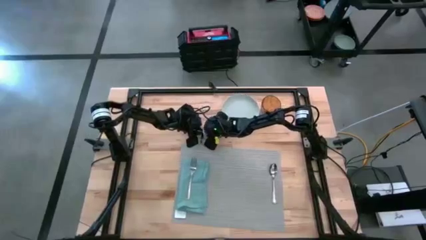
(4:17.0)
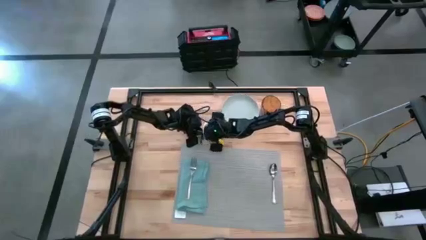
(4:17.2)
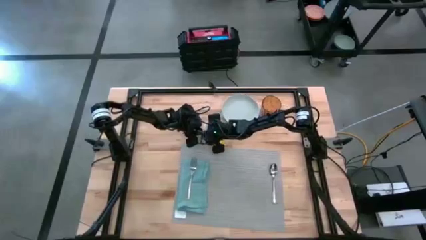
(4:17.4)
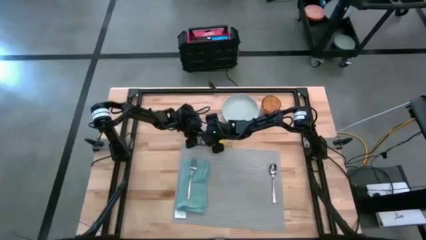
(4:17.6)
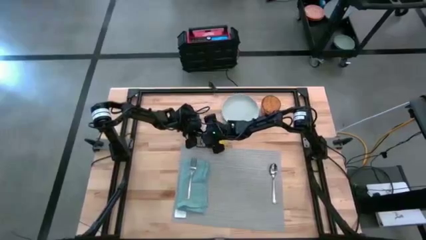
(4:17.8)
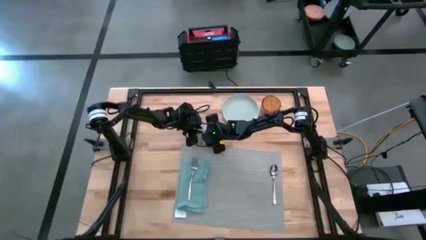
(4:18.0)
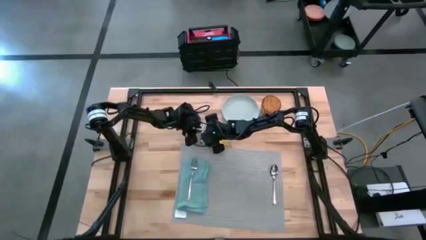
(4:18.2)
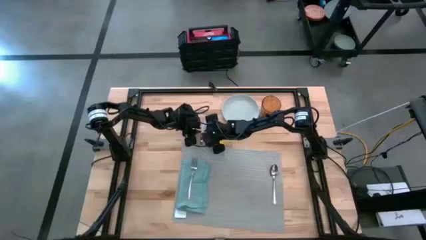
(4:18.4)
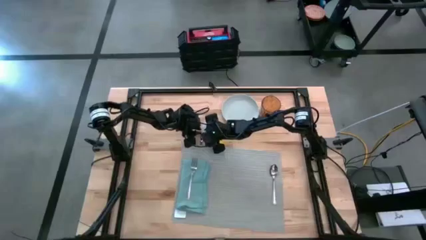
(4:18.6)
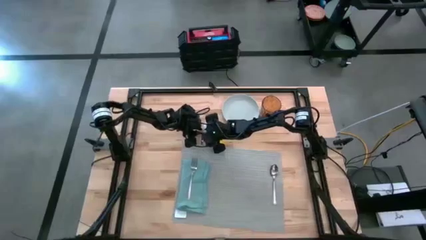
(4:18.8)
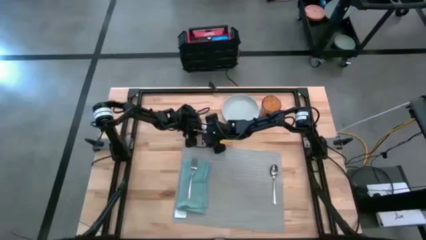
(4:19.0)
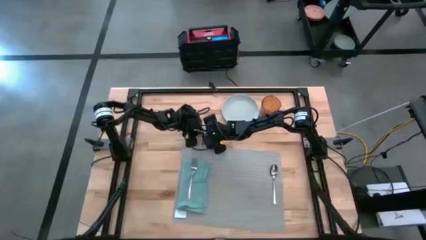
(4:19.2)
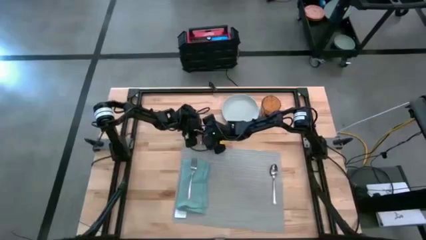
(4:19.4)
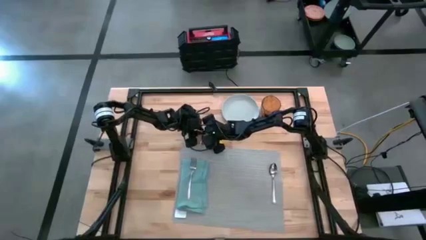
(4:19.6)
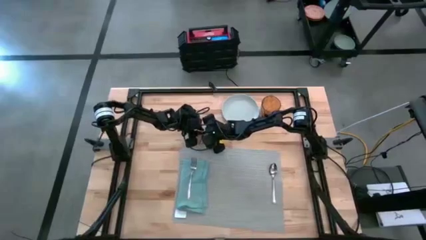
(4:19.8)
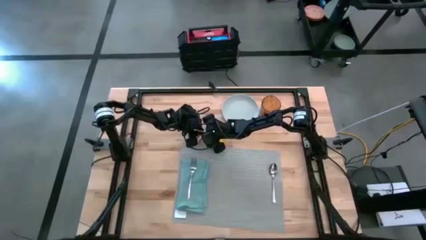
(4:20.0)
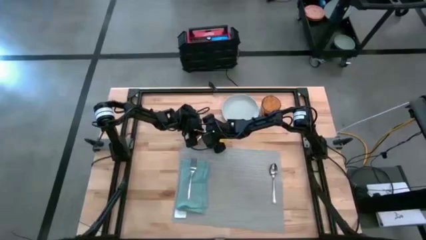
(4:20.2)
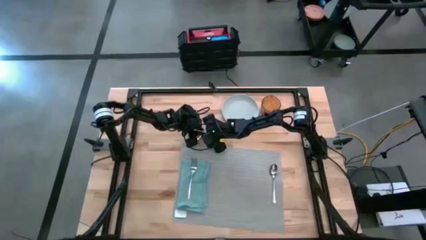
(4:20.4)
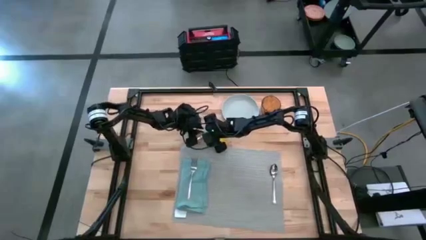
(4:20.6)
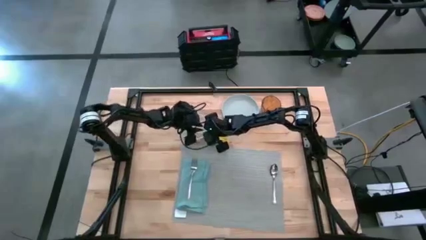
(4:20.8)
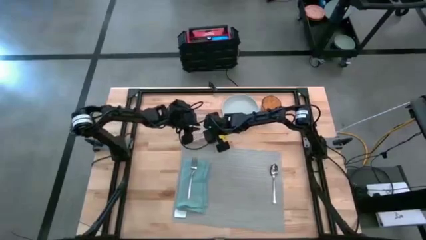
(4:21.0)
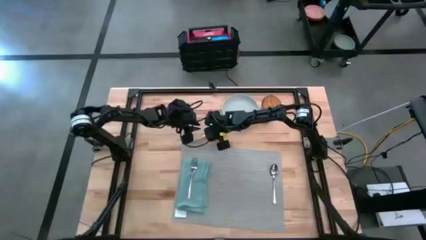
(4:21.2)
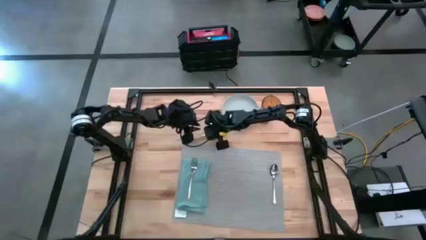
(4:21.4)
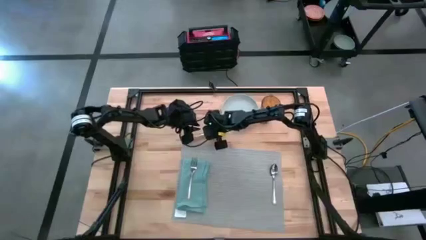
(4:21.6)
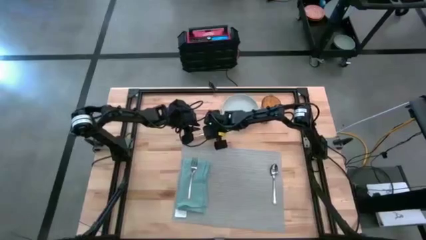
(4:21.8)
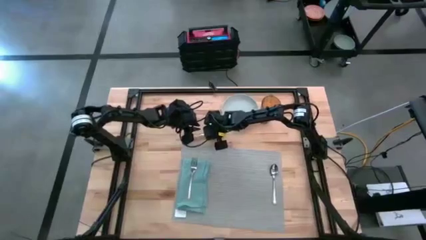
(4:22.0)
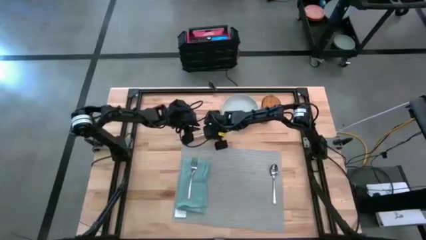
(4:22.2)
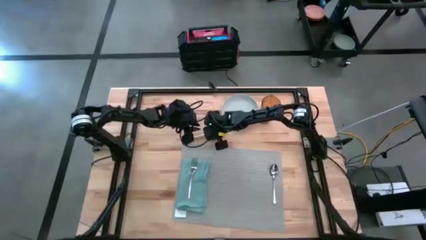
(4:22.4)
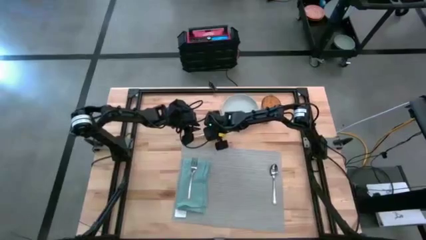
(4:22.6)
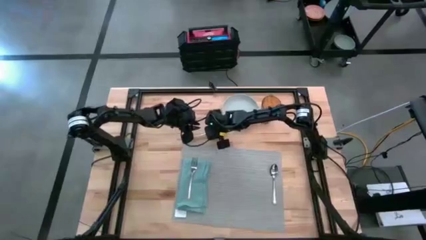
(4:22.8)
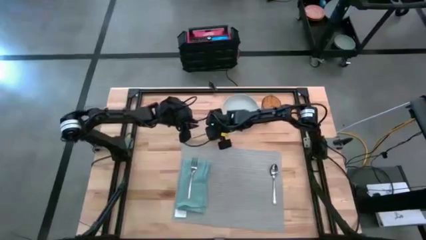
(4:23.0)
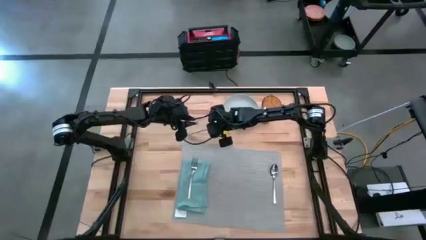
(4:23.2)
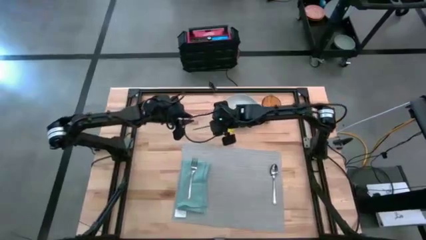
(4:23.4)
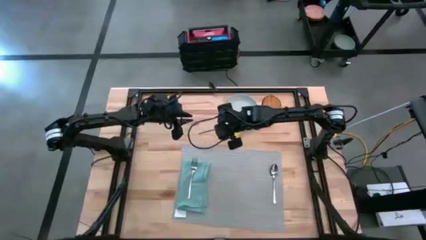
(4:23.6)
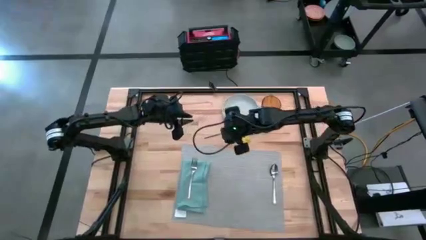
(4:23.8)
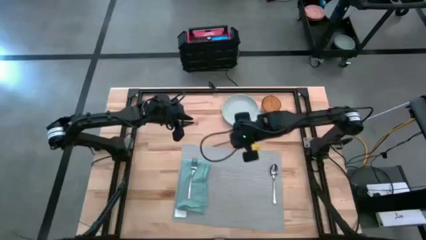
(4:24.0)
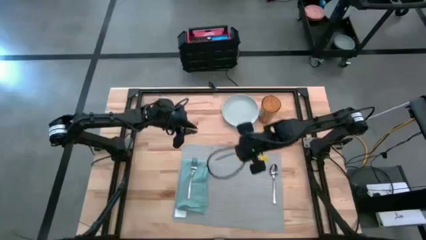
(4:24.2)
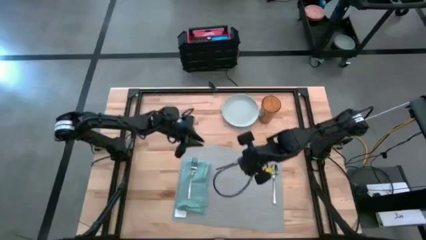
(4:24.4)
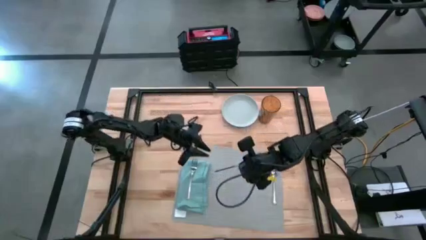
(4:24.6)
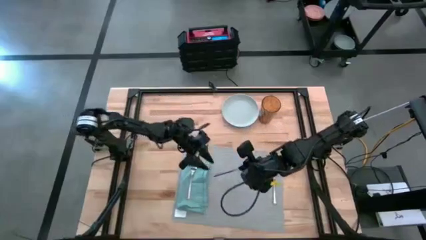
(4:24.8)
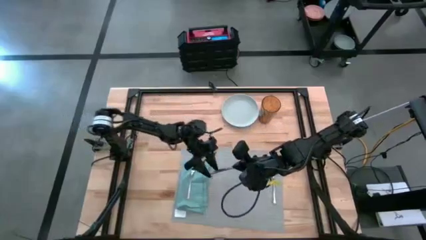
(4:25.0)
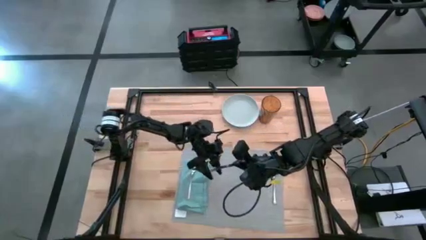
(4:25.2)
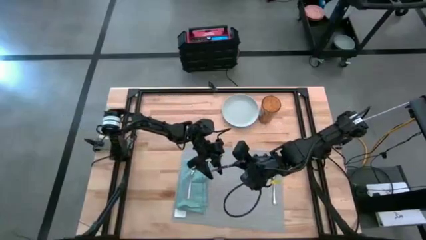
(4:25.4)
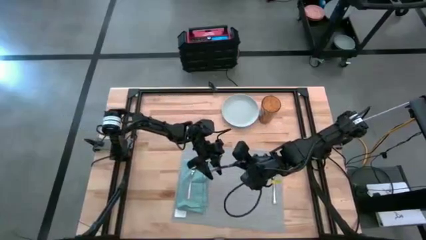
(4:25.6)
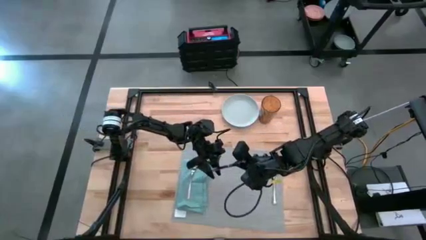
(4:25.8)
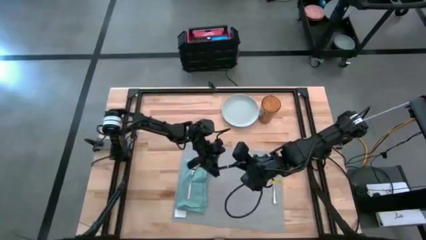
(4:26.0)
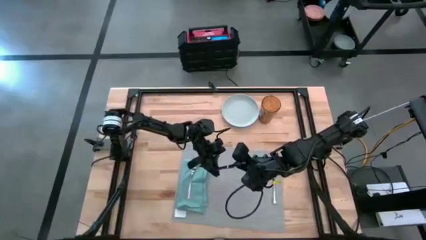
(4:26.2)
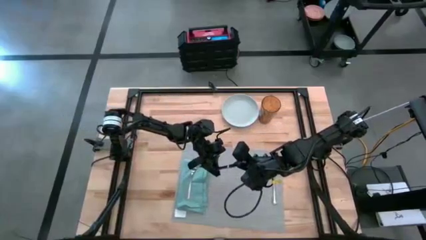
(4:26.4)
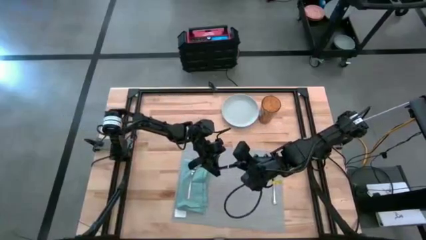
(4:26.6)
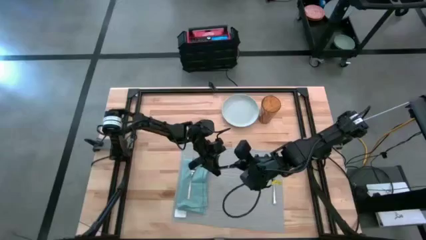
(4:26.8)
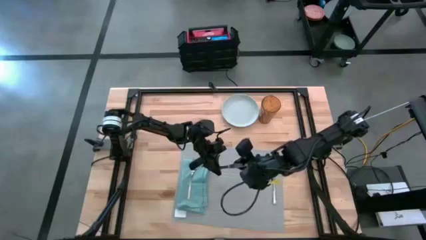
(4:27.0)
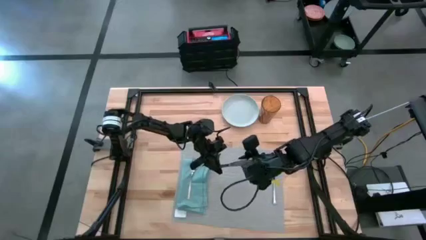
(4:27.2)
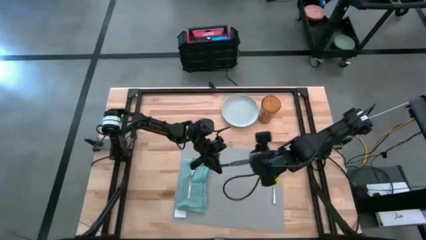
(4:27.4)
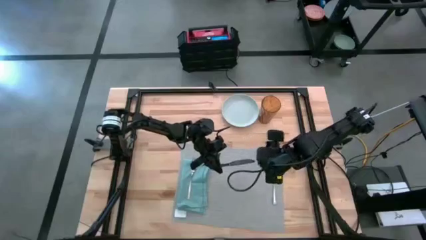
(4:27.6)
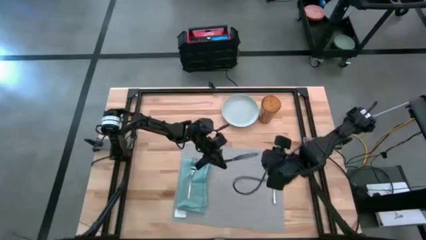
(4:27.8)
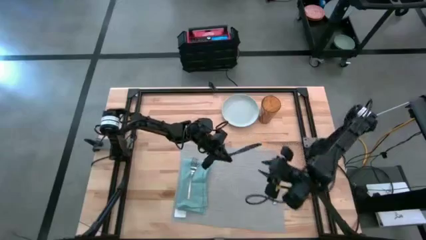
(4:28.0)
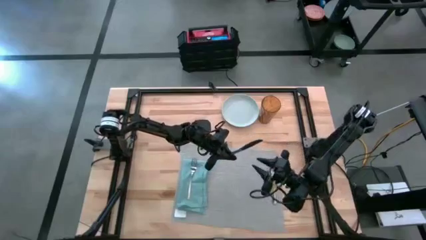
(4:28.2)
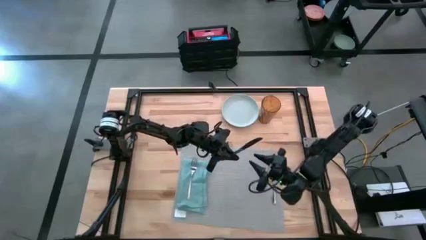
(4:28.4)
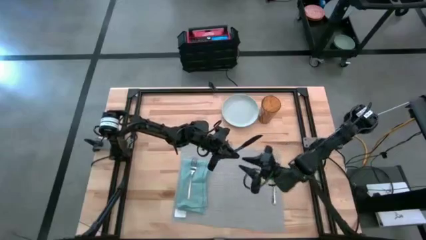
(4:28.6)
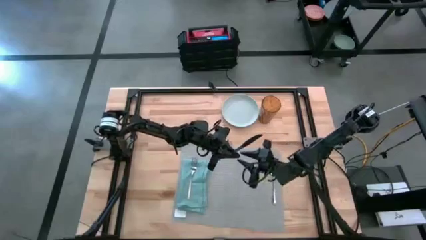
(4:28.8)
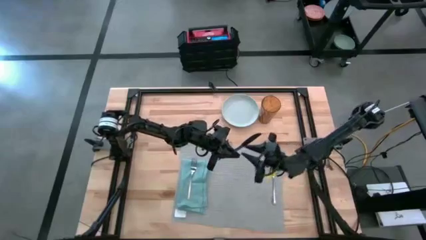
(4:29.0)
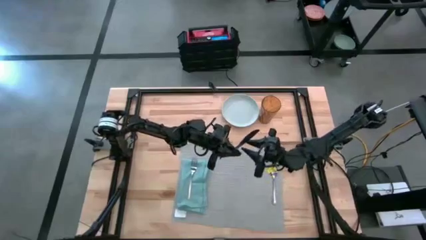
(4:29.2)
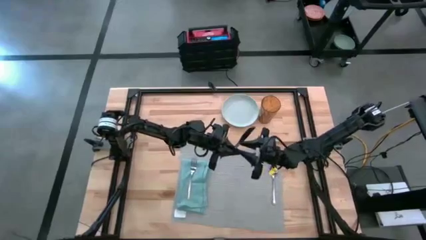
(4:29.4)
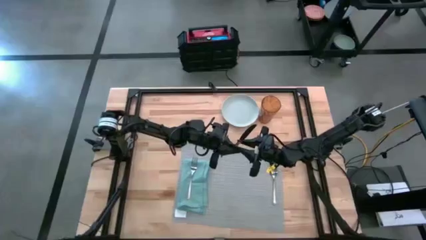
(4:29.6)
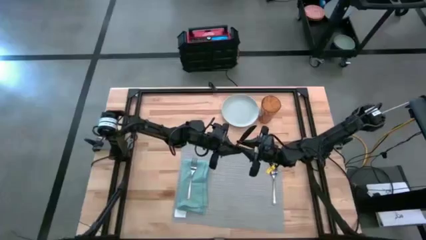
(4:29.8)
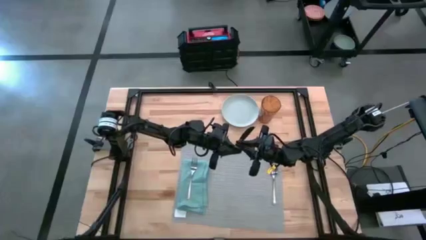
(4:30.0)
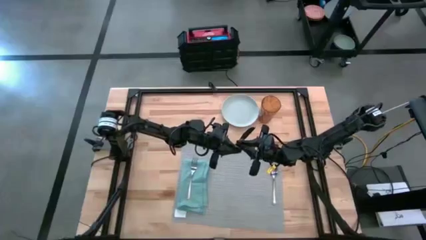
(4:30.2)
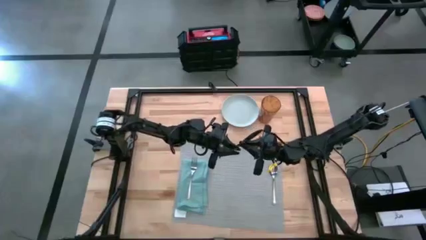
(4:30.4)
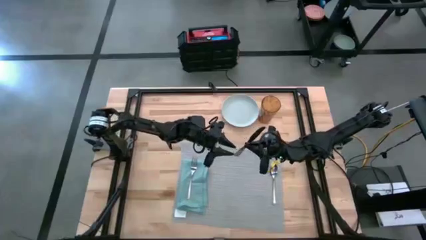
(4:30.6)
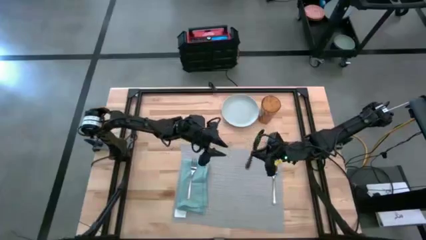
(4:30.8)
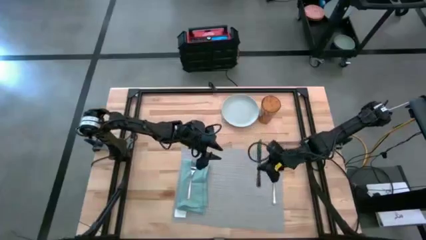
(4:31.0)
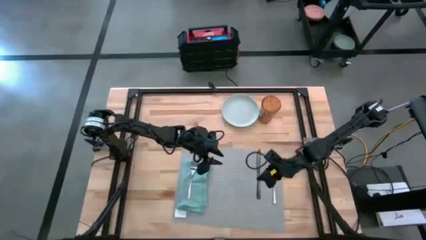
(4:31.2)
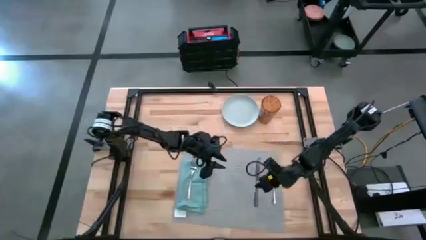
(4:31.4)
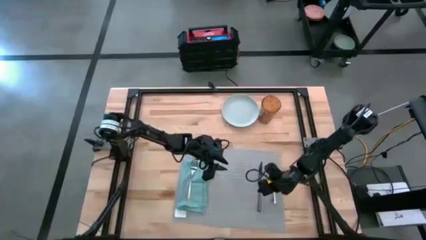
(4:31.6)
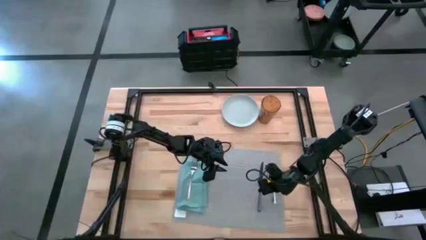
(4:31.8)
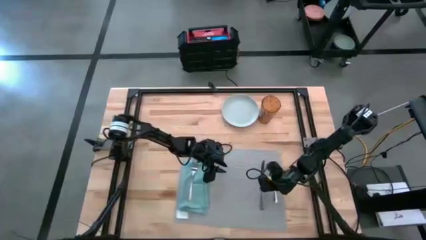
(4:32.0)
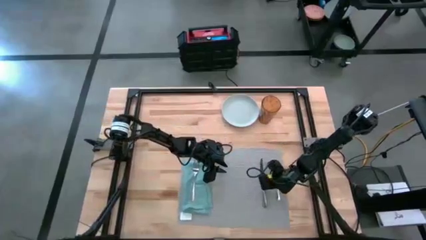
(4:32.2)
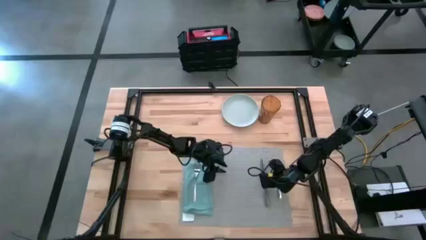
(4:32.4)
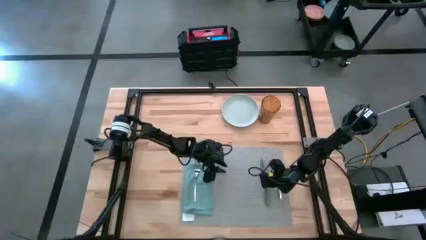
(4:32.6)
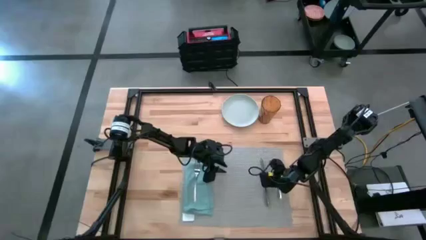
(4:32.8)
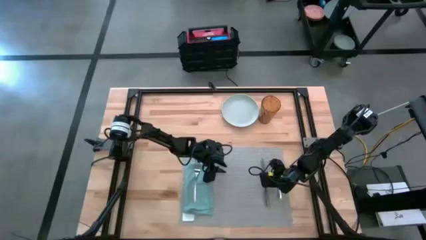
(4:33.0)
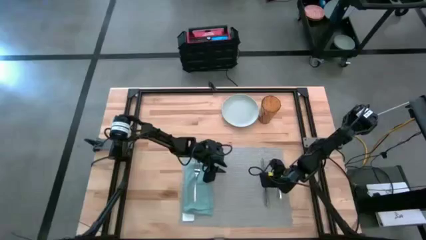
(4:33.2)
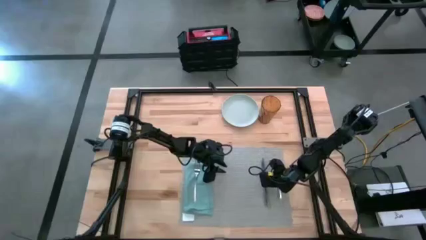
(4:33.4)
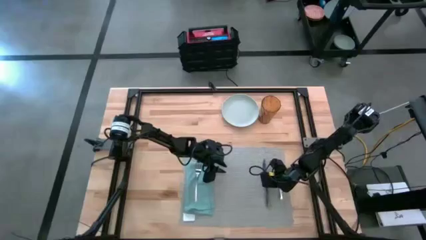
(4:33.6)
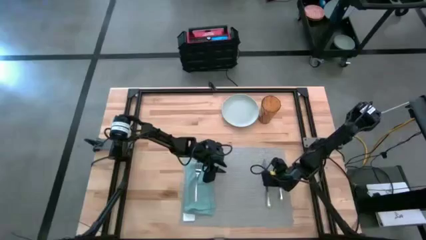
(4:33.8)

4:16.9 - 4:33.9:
Task: Set table place
Put the silver knife on the gray placemat, to the left of the silver spoon
